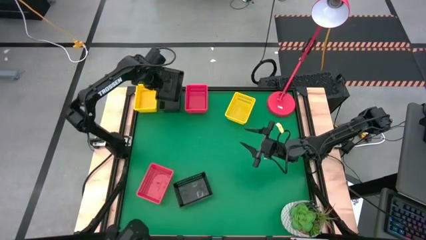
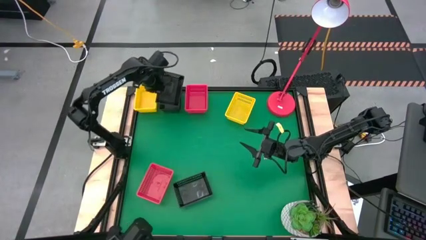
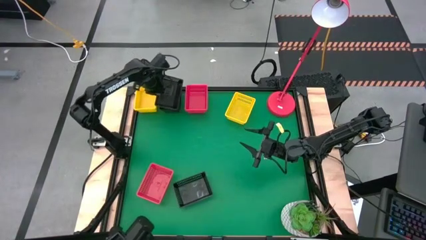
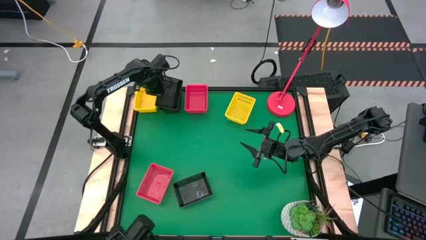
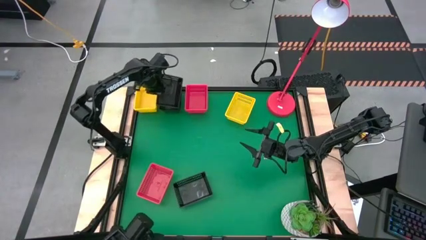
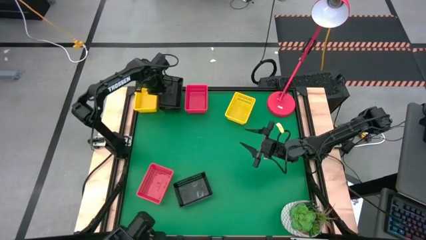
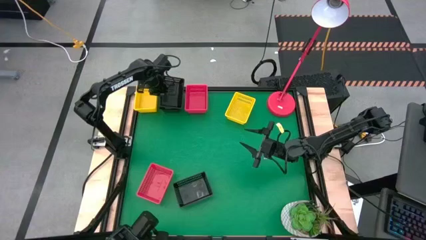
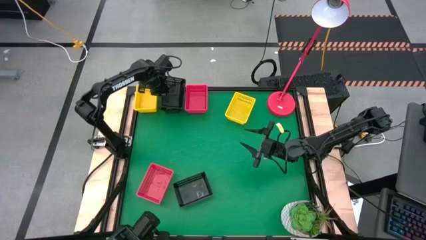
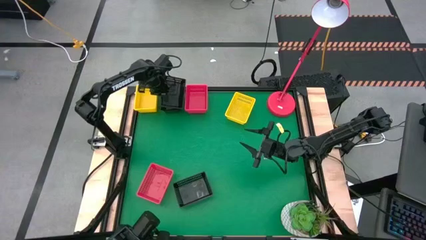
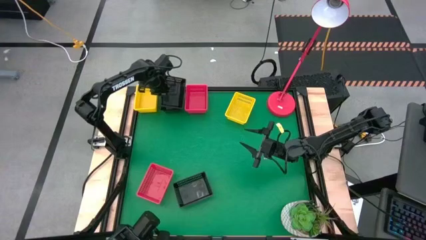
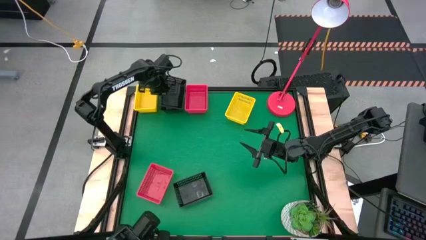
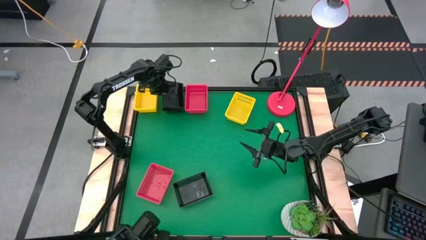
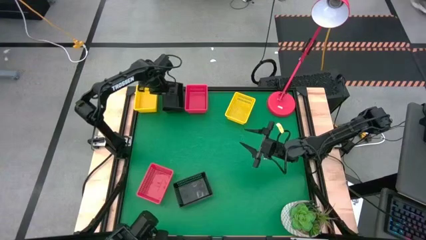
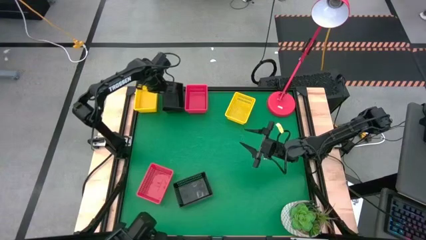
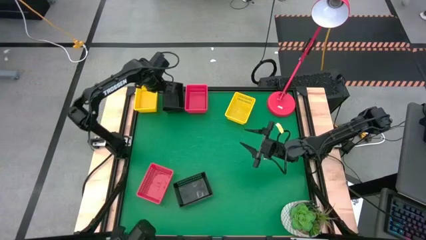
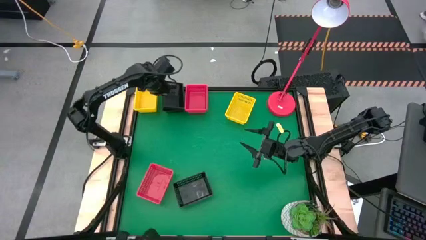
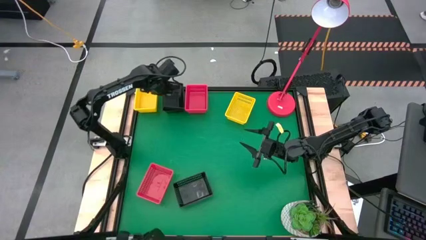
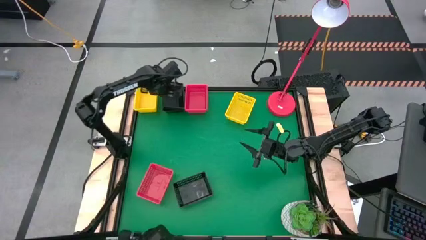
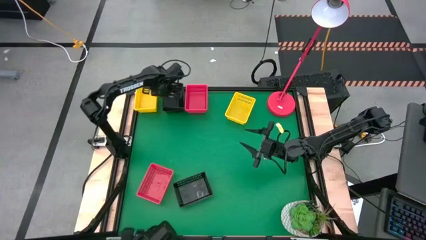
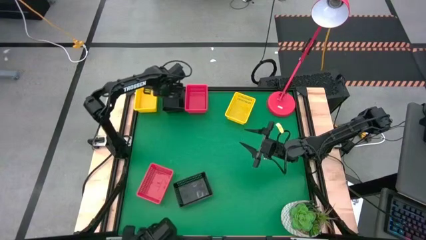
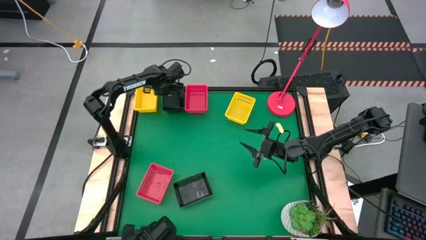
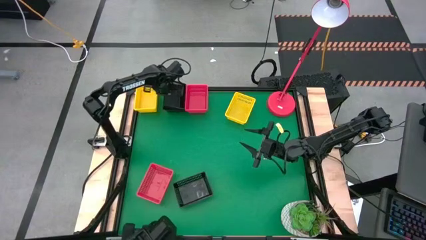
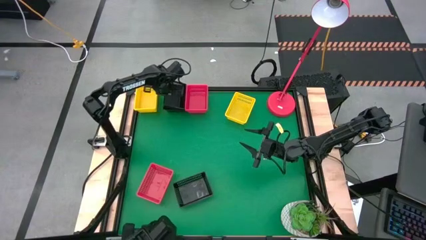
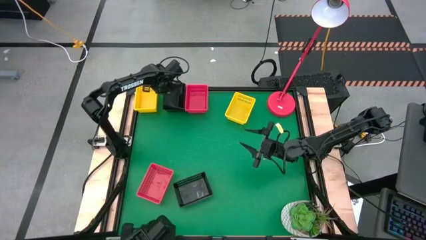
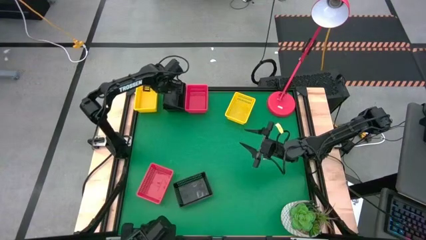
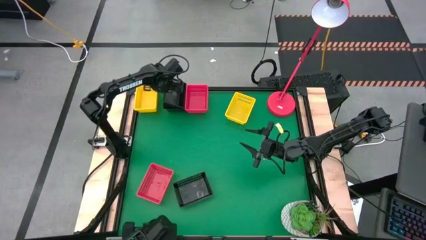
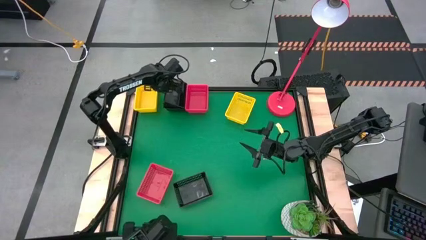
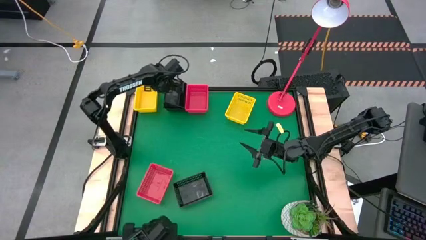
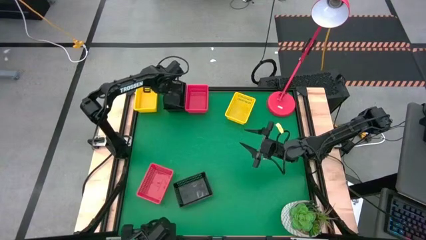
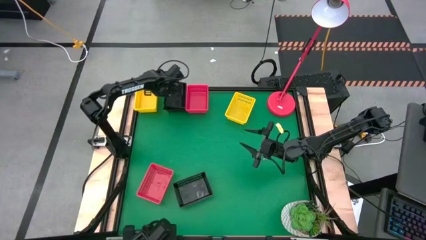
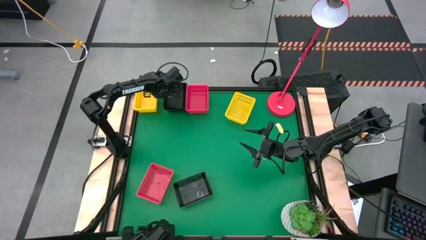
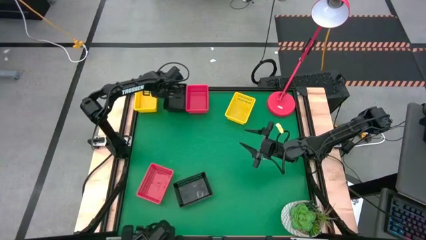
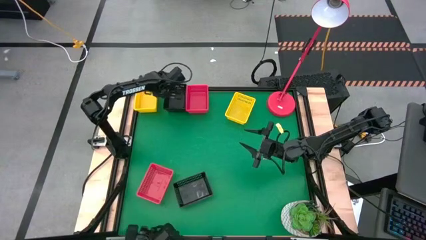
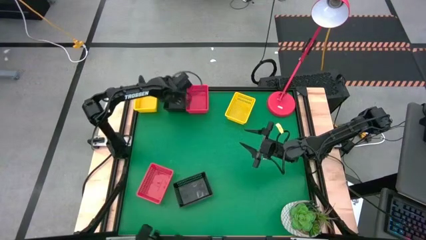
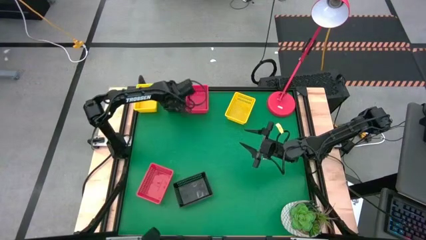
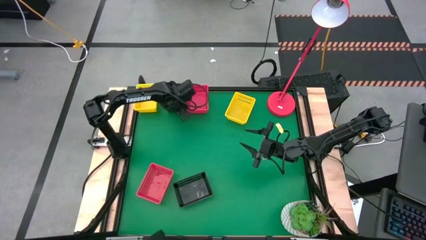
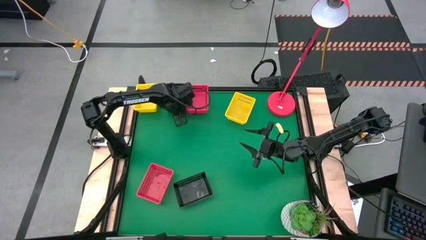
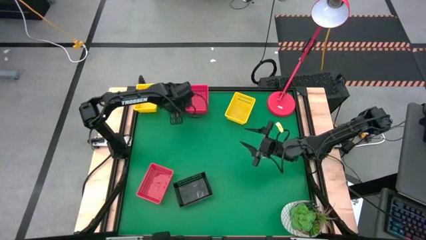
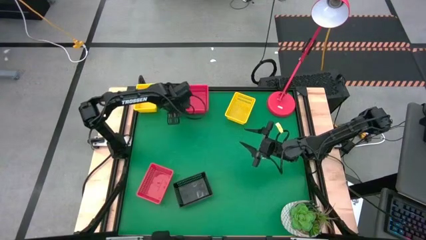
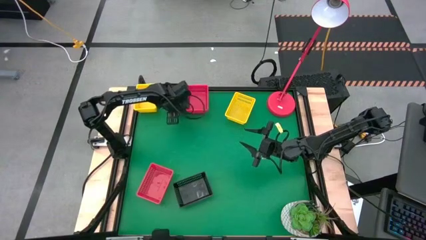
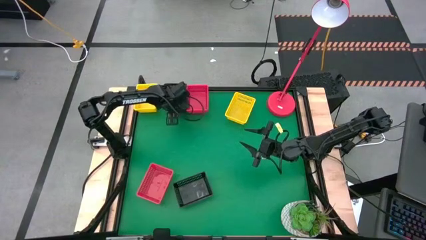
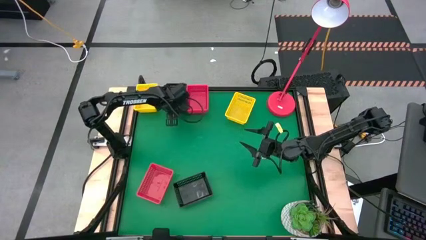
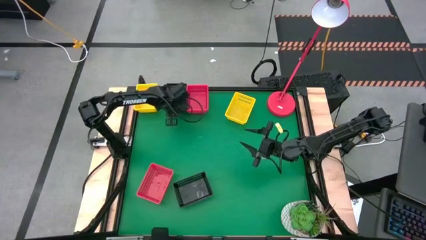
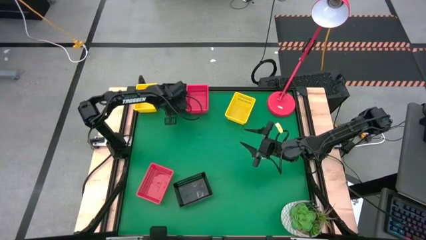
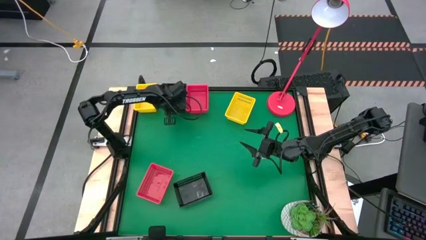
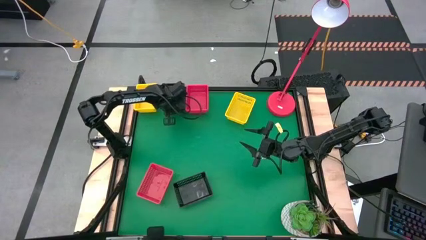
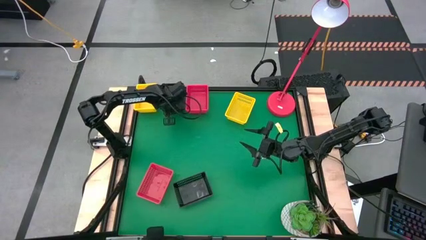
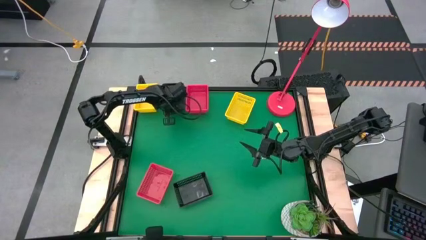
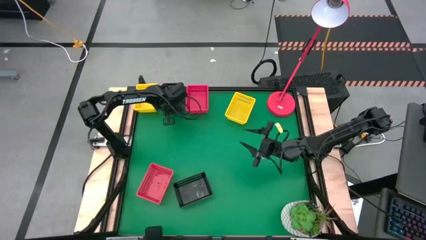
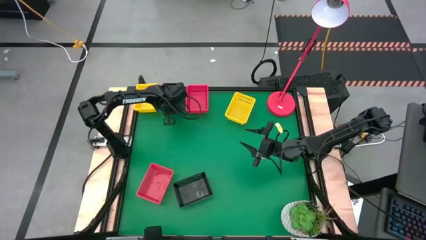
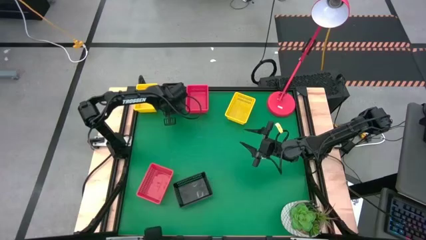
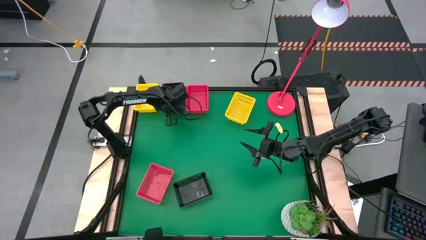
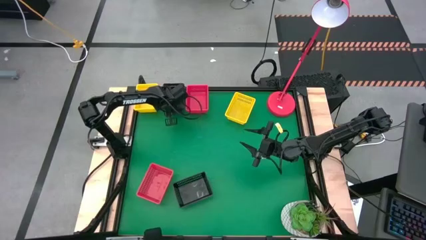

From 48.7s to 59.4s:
Stack the middle black bin on top of the top black bin
